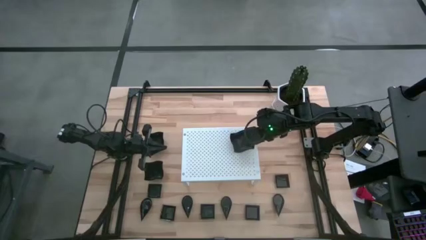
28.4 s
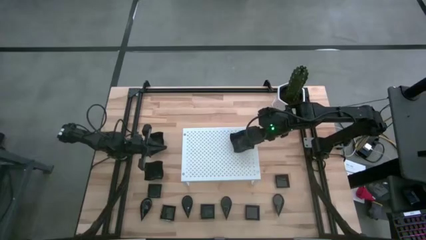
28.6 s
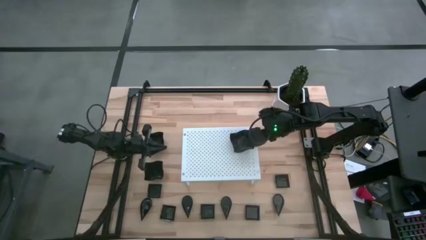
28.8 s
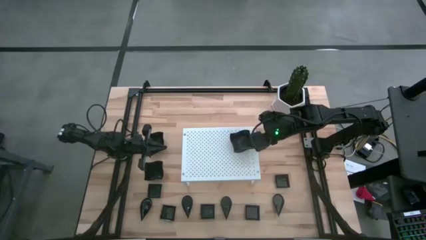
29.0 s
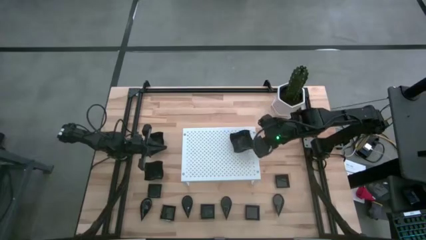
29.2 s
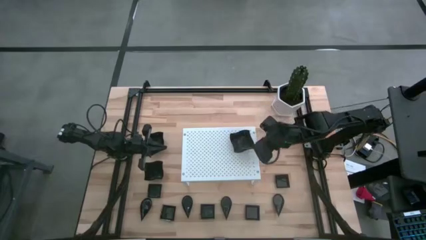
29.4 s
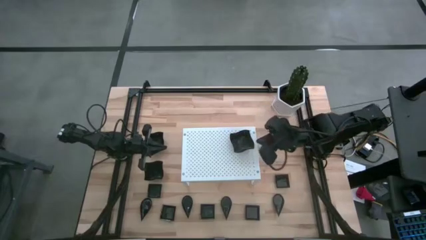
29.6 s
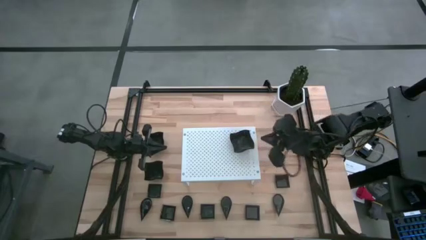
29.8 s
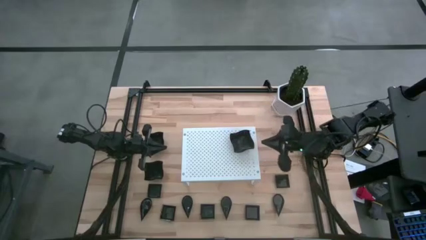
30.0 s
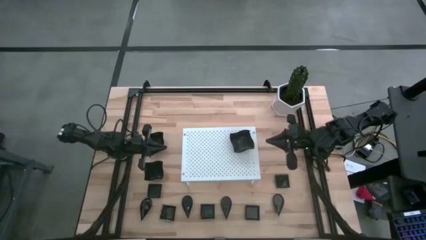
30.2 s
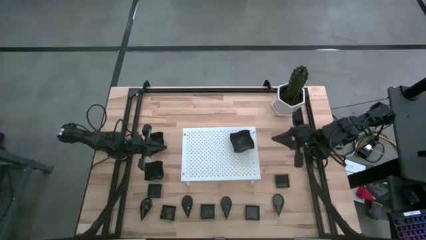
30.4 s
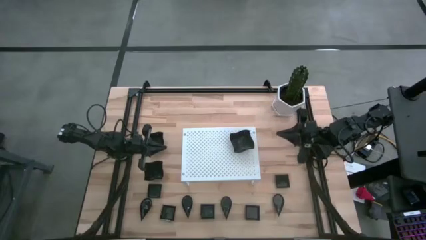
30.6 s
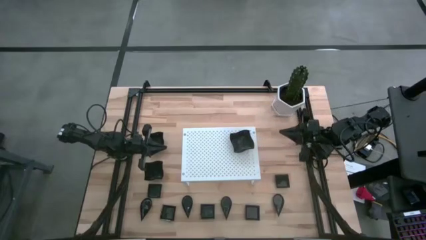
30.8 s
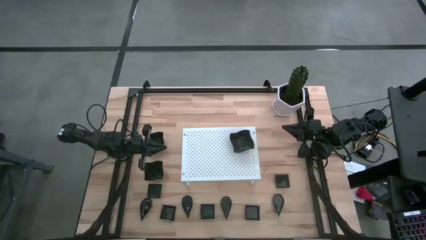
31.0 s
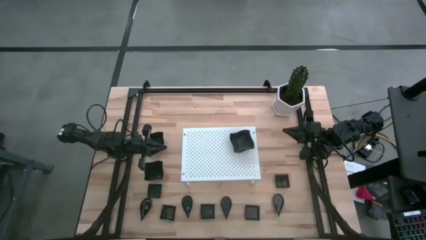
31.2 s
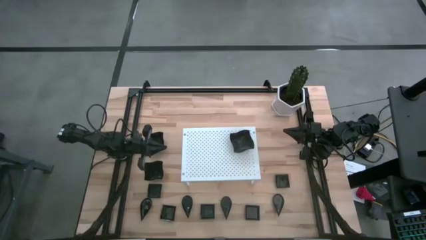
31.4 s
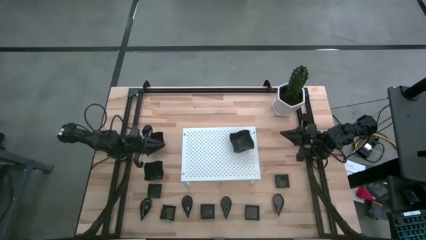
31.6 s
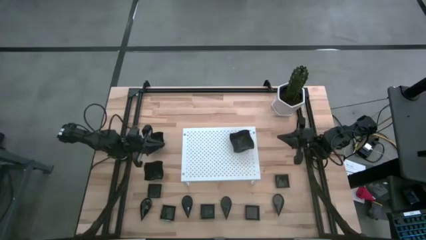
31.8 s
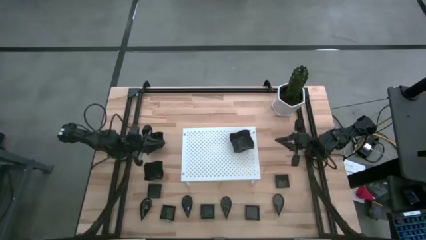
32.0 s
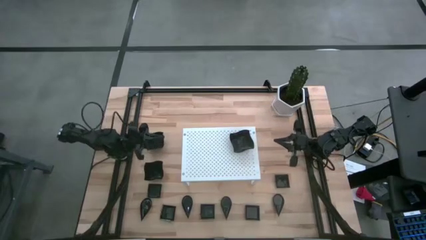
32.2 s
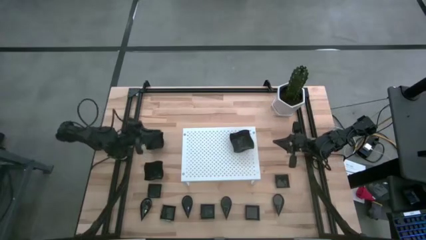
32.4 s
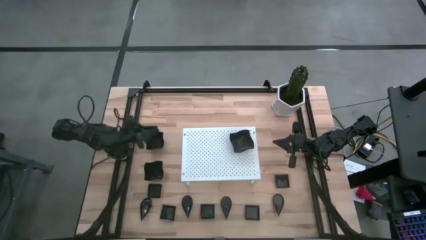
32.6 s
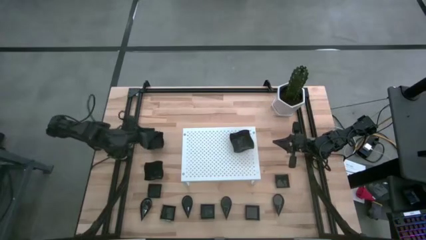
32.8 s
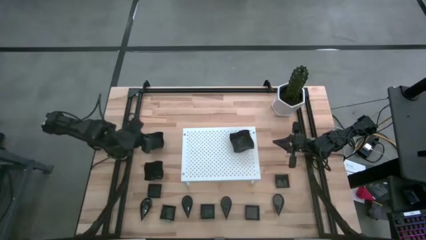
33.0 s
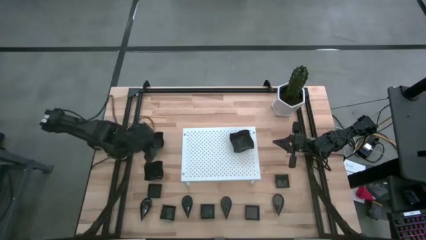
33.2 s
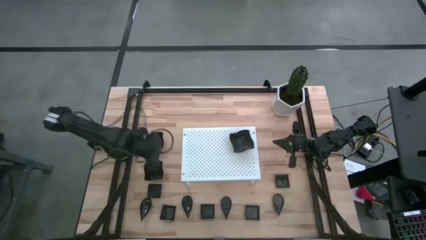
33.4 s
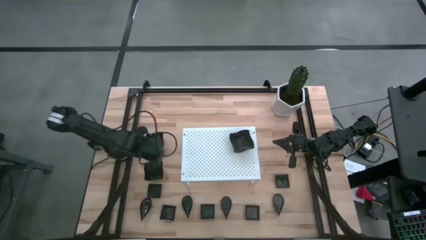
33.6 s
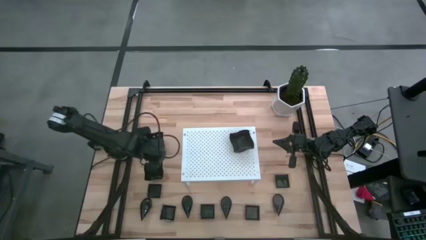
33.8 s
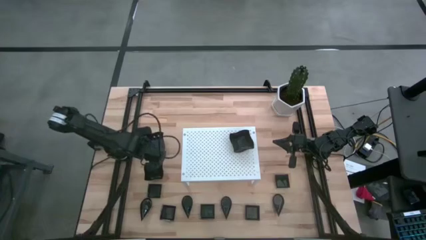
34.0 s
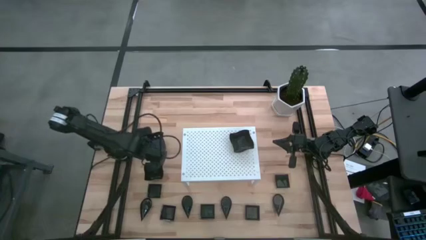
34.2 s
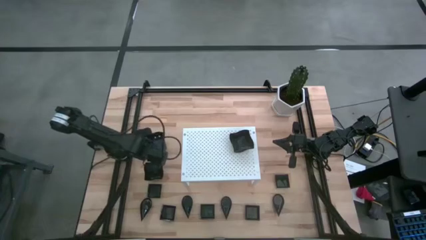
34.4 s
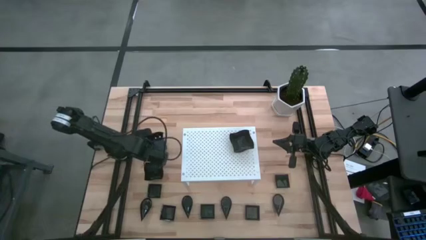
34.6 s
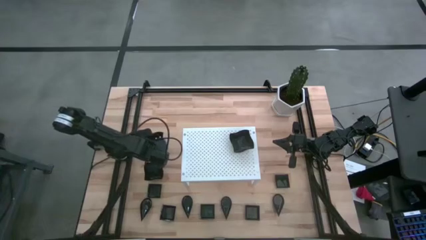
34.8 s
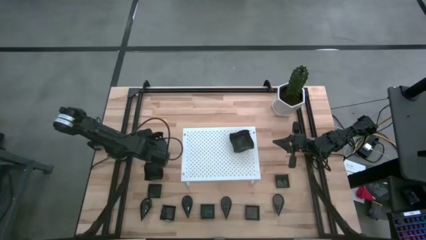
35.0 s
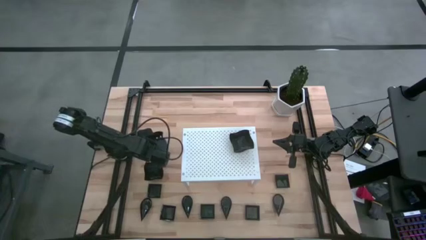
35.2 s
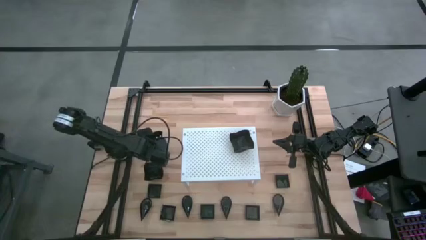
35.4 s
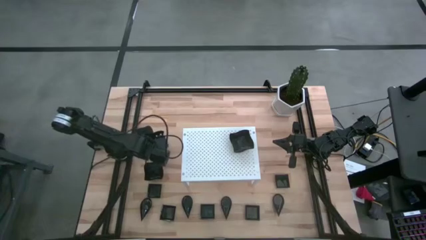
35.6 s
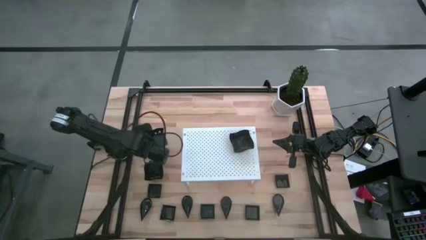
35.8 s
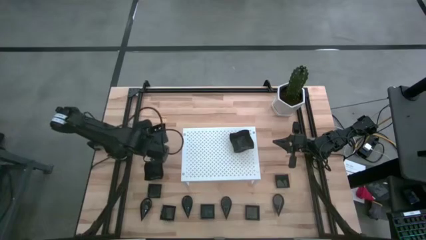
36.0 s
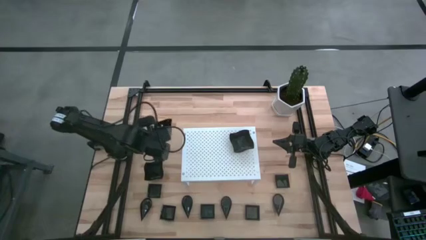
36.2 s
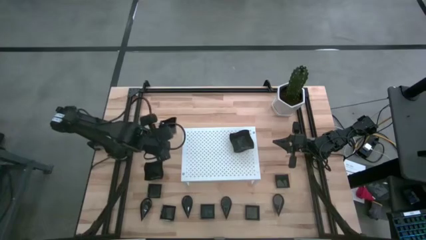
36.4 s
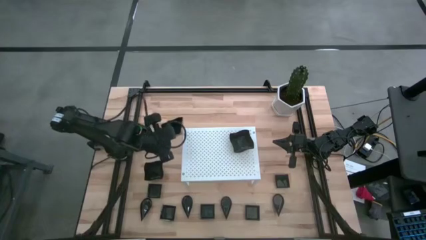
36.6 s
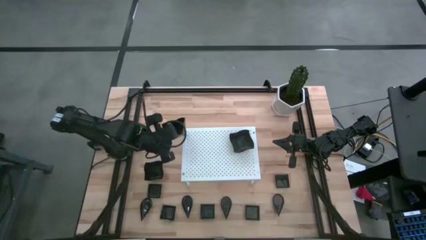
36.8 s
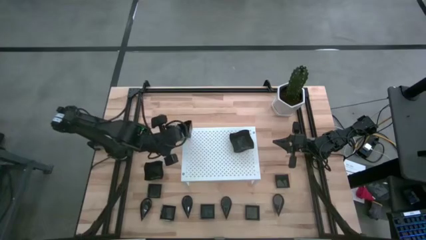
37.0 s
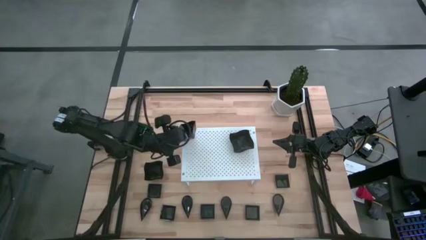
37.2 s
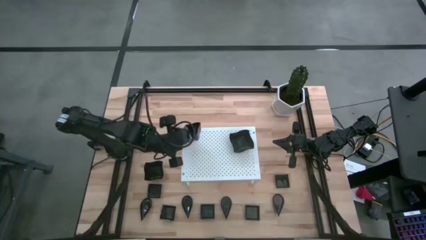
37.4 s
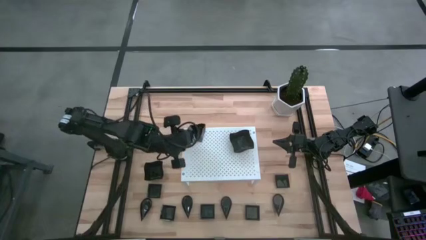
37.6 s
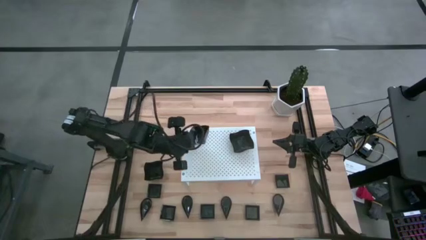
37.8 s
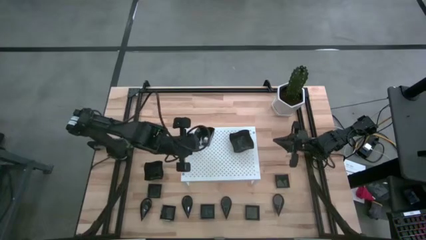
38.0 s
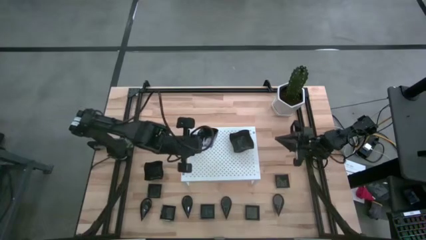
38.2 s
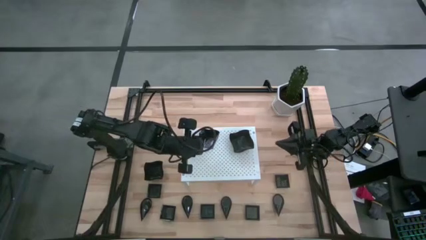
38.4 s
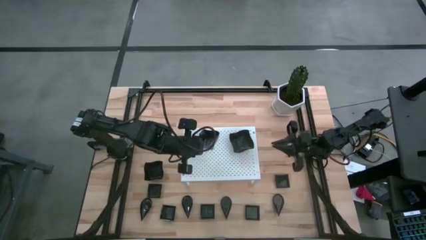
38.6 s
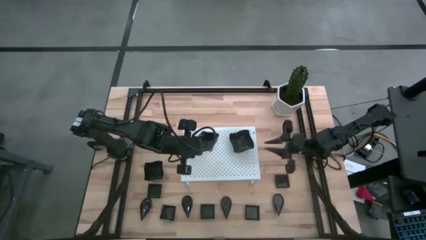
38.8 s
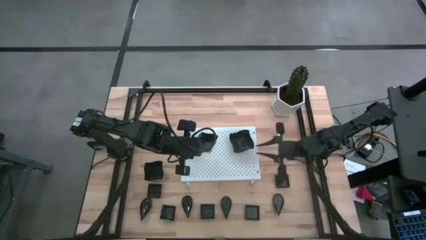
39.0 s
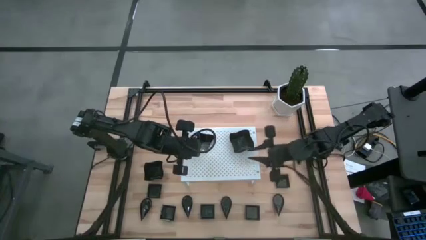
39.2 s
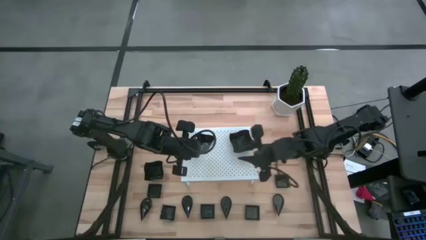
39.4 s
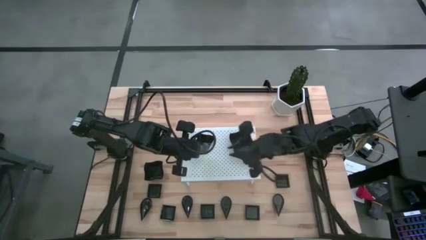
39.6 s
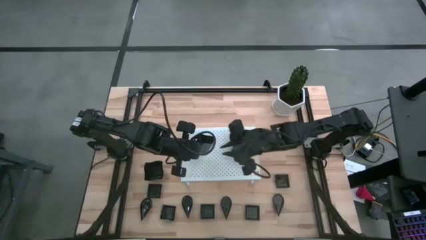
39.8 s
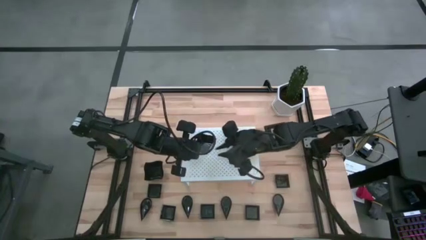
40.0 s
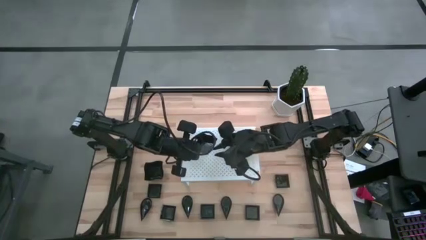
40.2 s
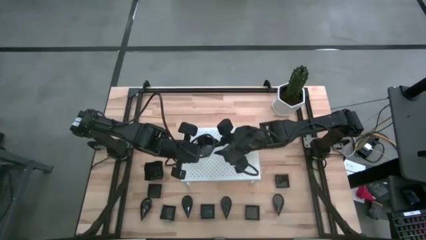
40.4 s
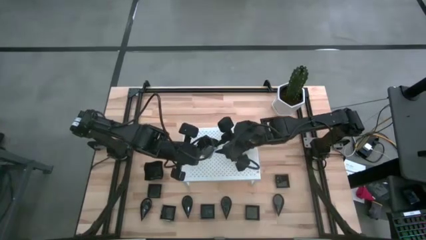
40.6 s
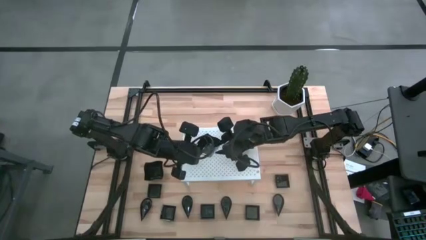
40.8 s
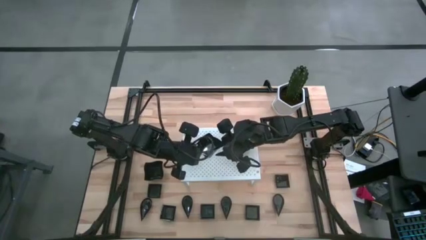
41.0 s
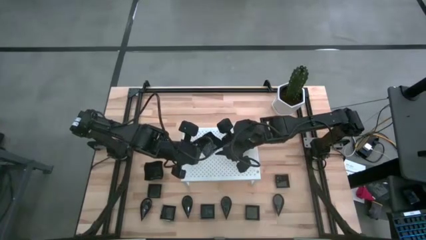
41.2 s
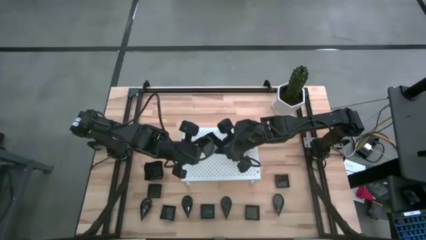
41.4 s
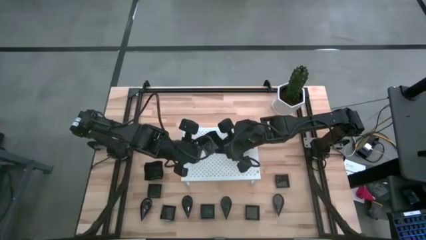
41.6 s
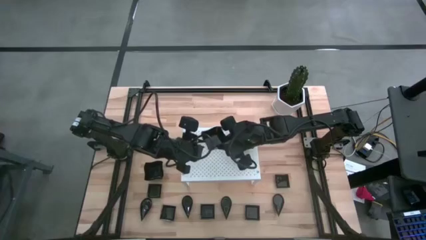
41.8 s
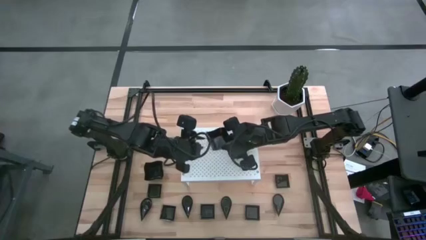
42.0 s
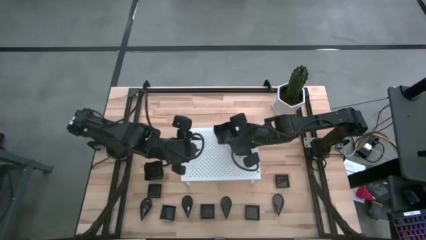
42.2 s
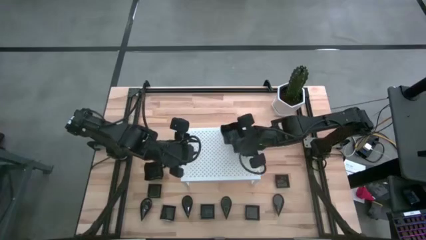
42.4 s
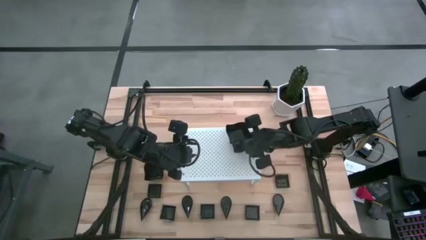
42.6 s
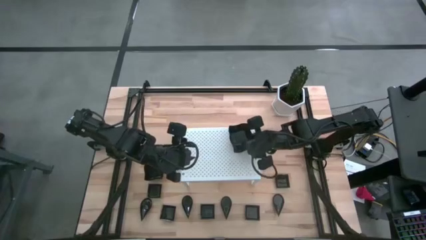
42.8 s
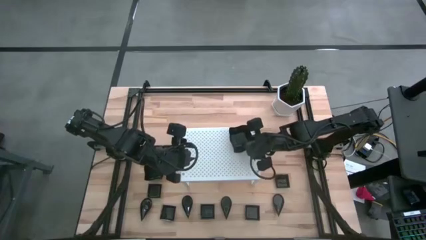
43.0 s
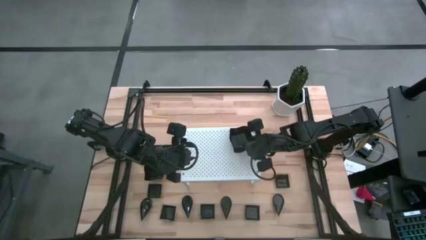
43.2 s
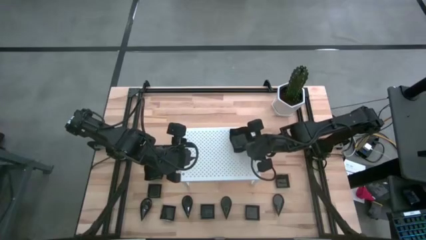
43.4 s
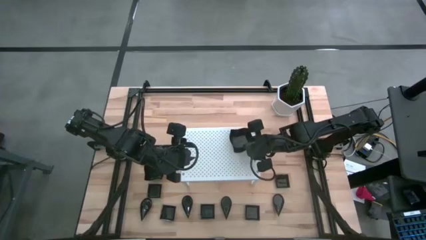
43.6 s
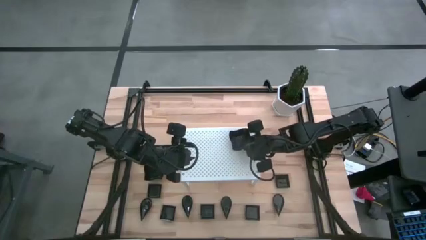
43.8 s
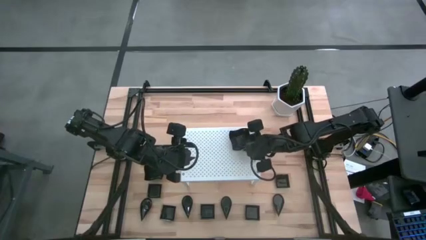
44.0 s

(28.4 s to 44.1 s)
Task: Pick & Place Mini shaped plates
Stack the distorted square plate on the other distorted square plate on the shelf
